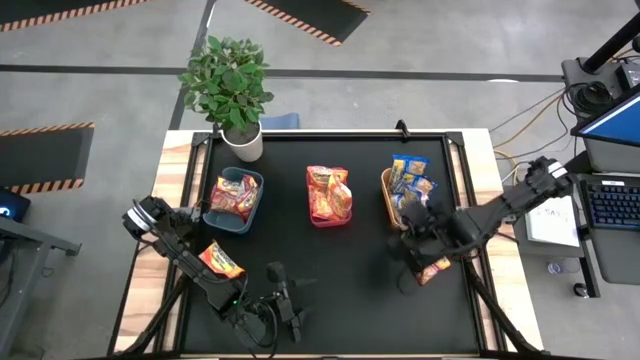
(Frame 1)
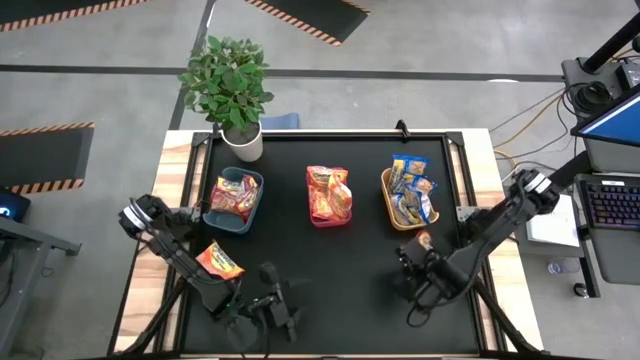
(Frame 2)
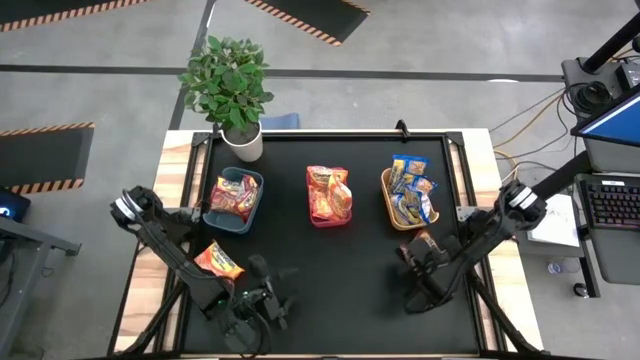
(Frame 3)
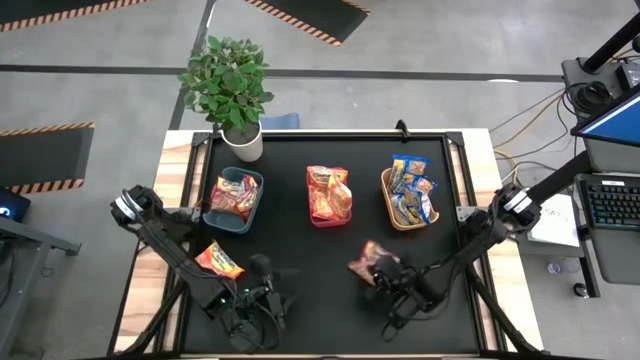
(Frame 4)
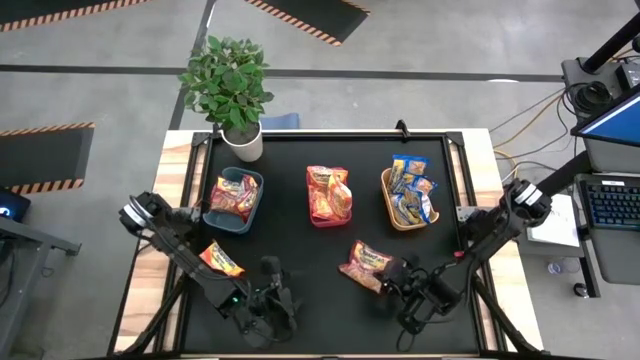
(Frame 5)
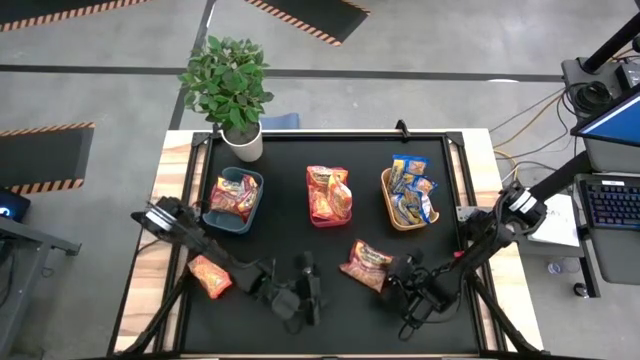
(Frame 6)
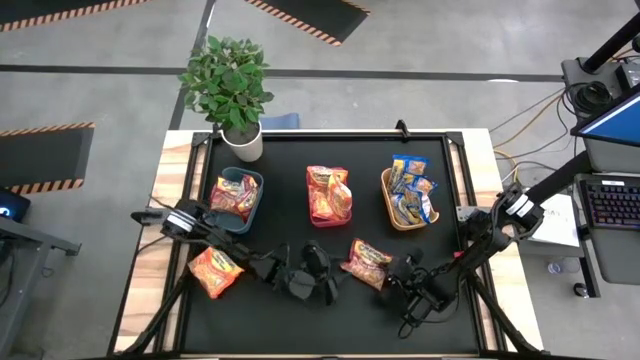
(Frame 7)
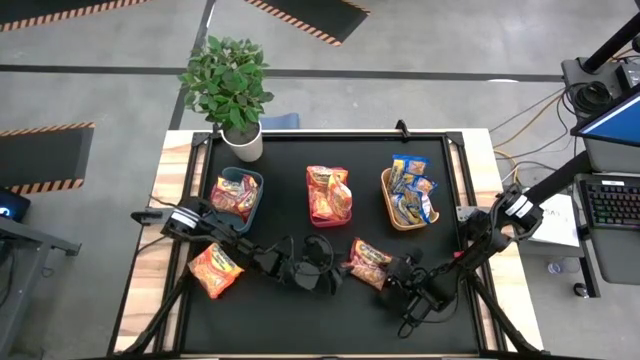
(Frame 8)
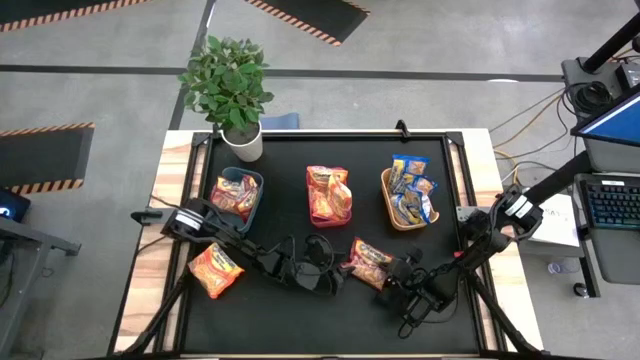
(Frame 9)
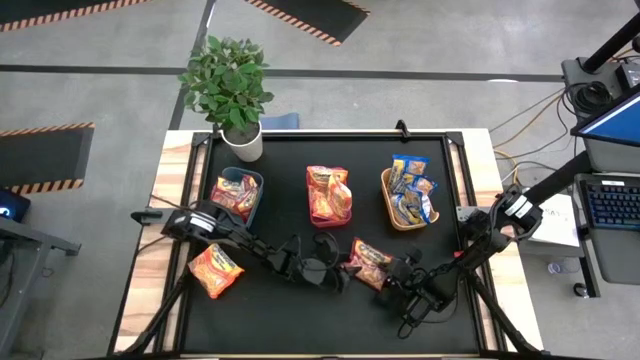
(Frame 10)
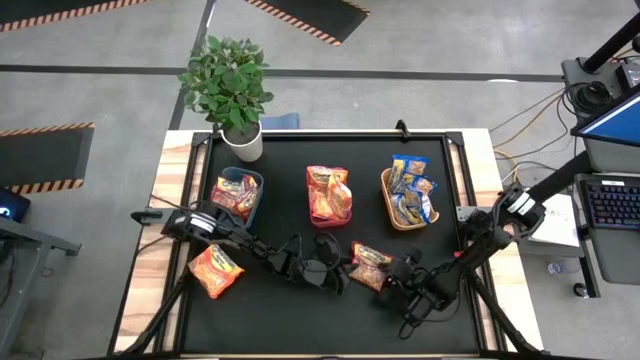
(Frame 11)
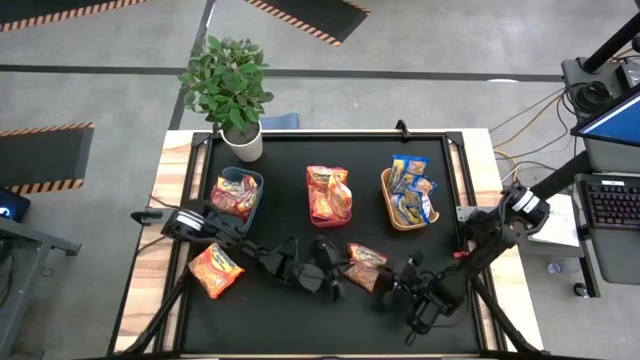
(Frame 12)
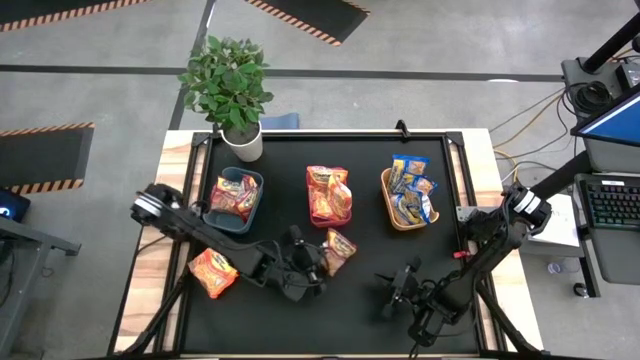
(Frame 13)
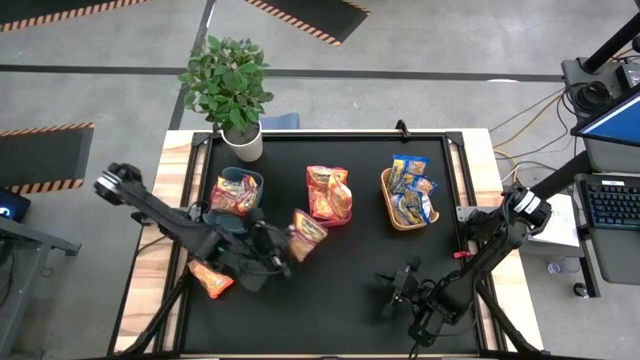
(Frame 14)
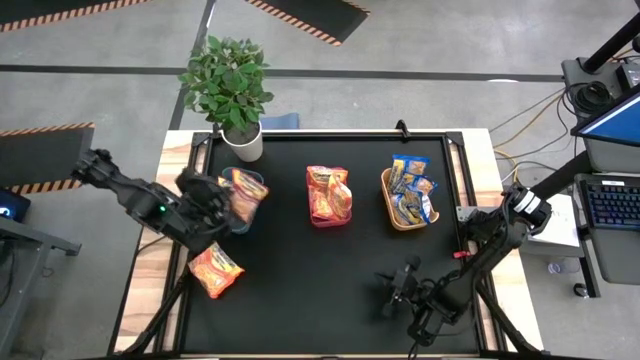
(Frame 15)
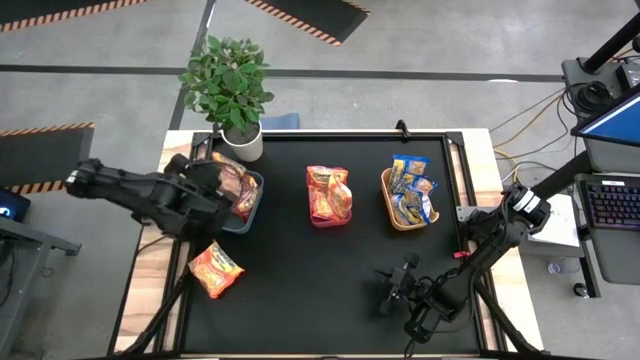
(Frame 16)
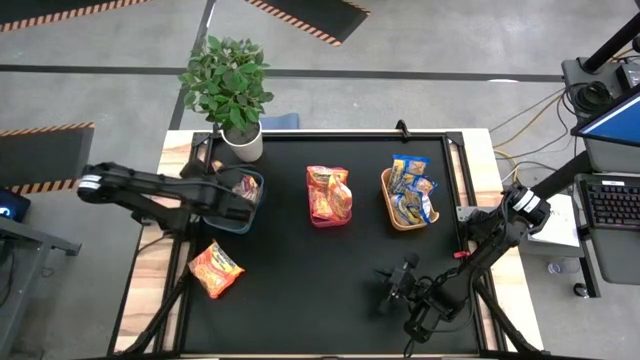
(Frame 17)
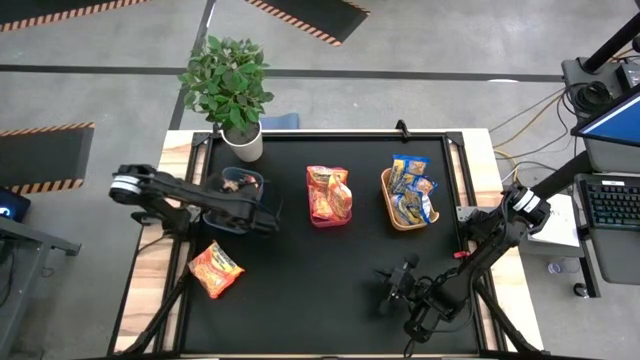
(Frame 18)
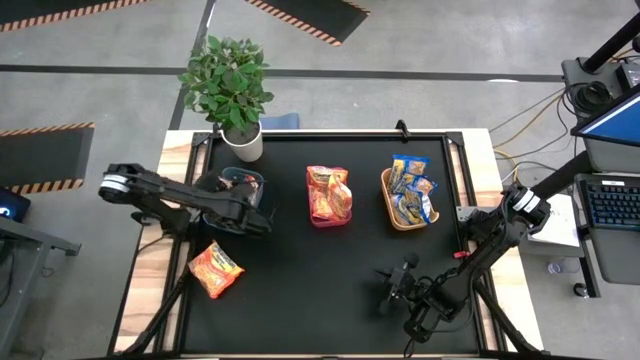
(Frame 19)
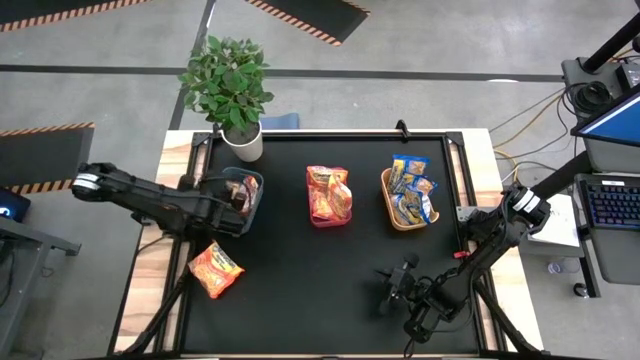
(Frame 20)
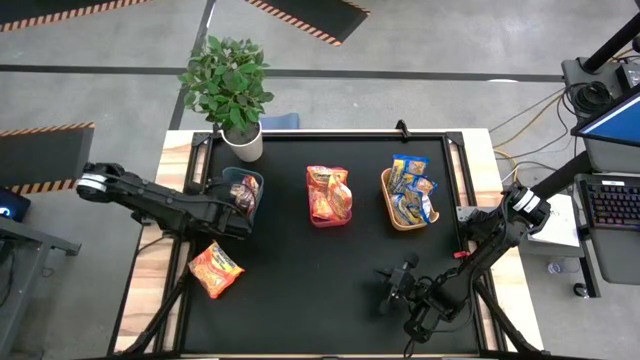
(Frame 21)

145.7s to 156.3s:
Task: Sort Maruchan noodles
Put the red noodle pack into the blue bin

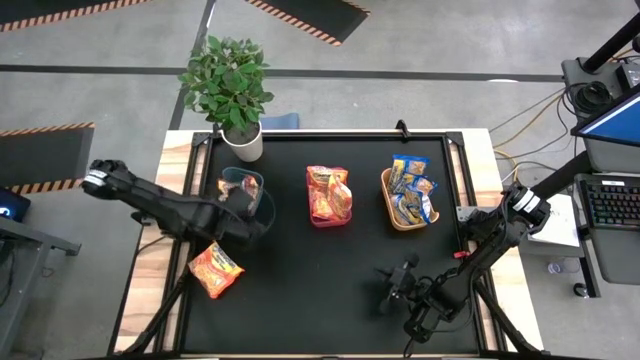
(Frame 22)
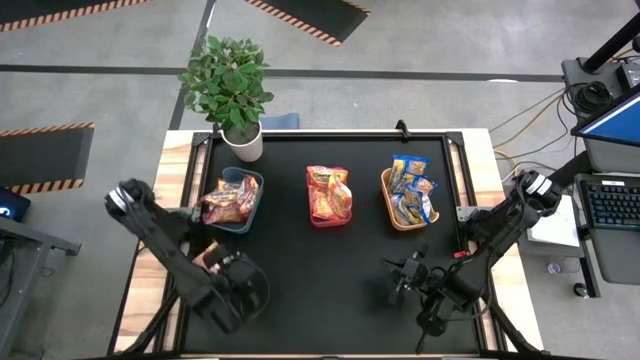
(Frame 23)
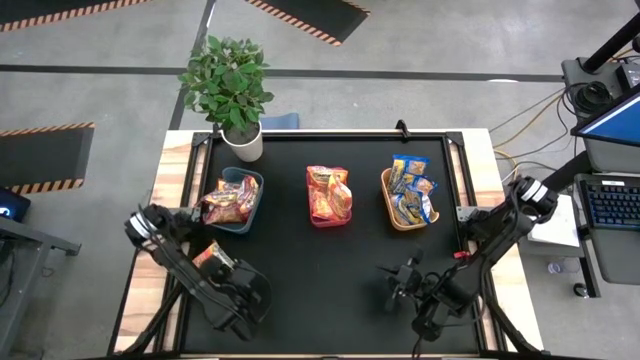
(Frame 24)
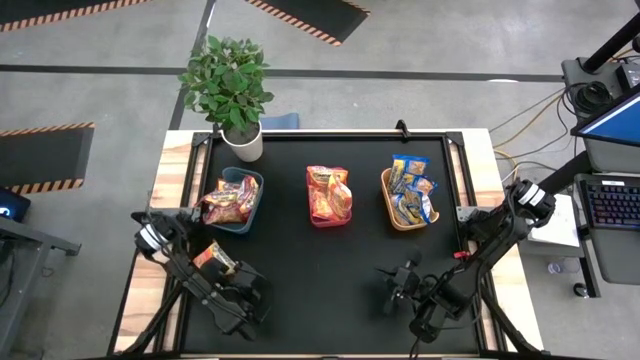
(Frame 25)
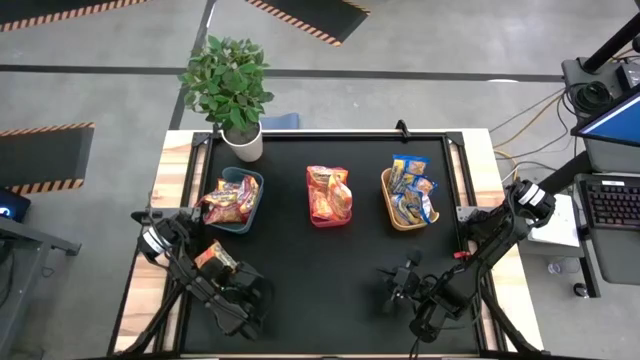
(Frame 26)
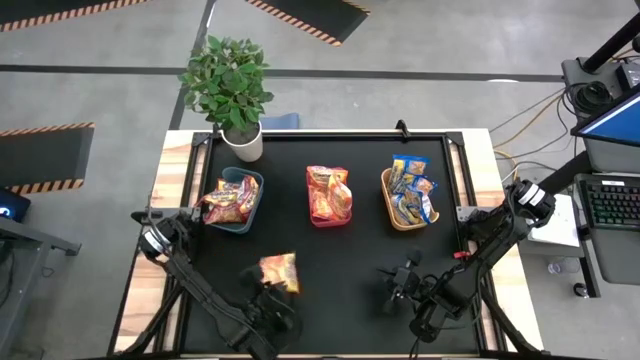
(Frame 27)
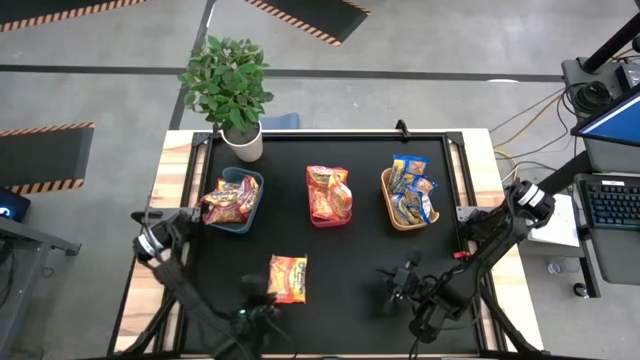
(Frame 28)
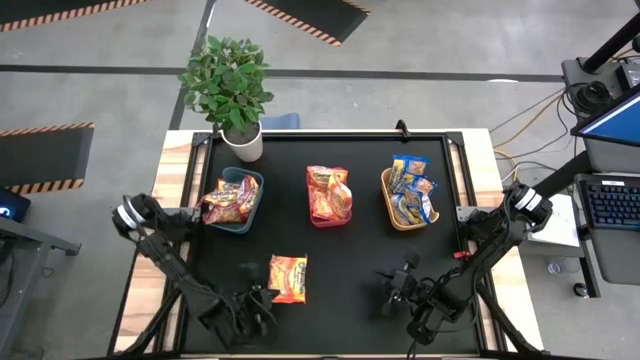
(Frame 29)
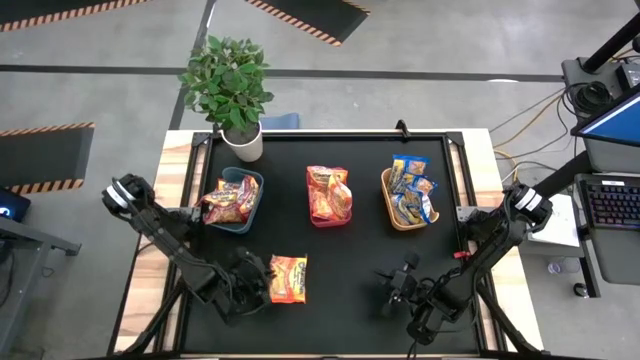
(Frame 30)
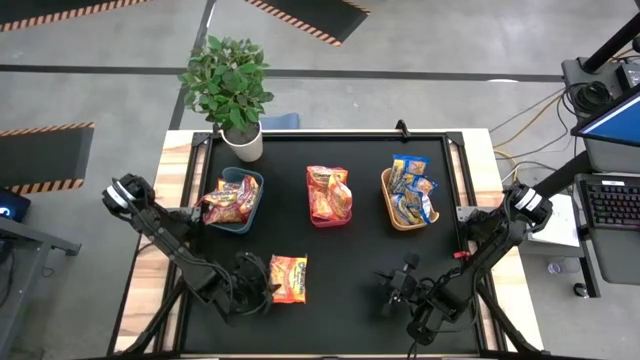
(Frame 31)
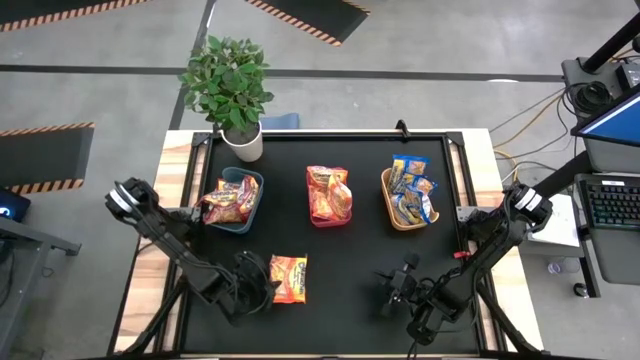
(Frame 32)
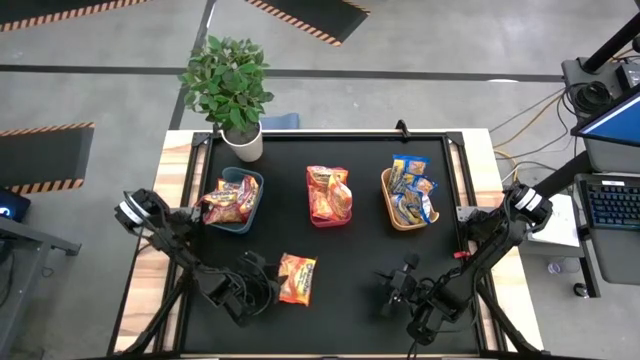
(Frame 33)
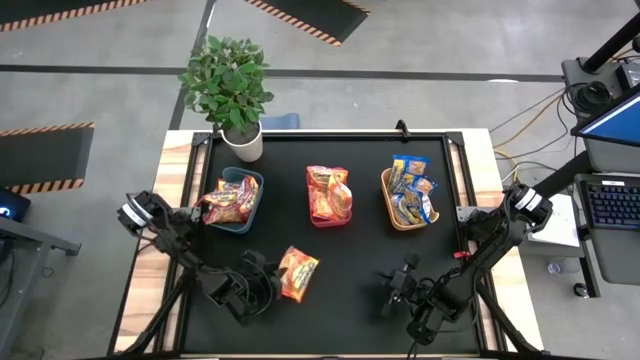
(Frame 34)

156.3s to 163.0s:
Put the orange noodle pack into the red bin

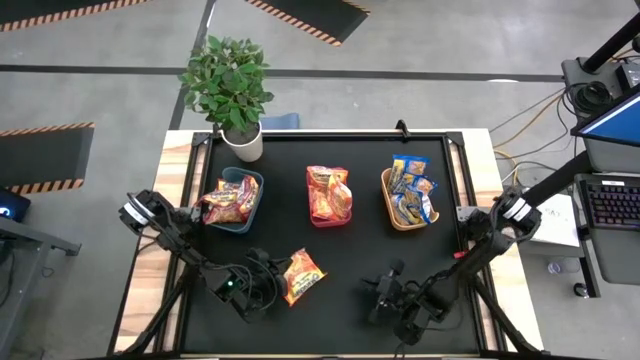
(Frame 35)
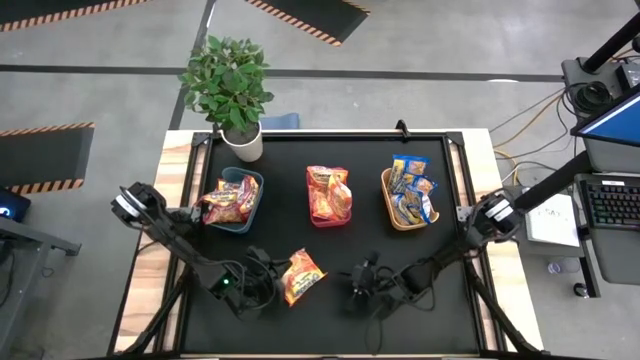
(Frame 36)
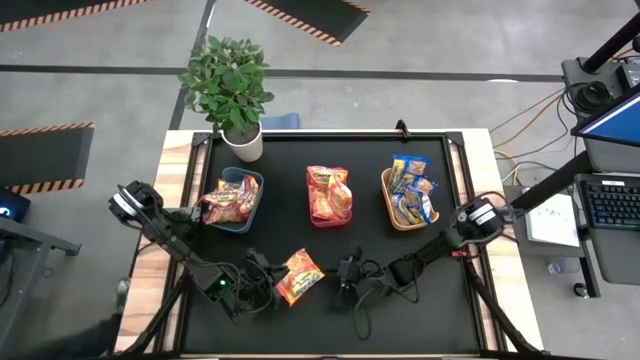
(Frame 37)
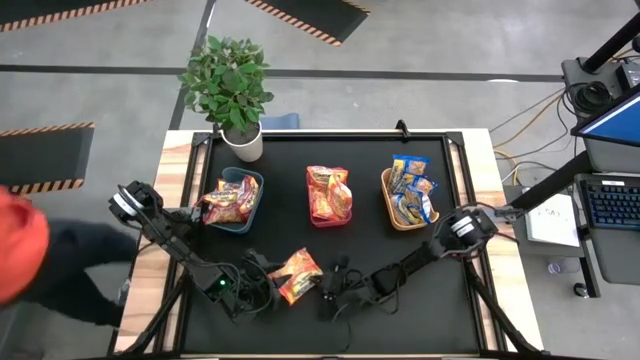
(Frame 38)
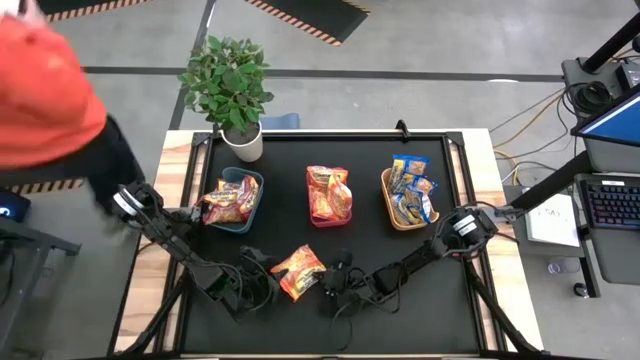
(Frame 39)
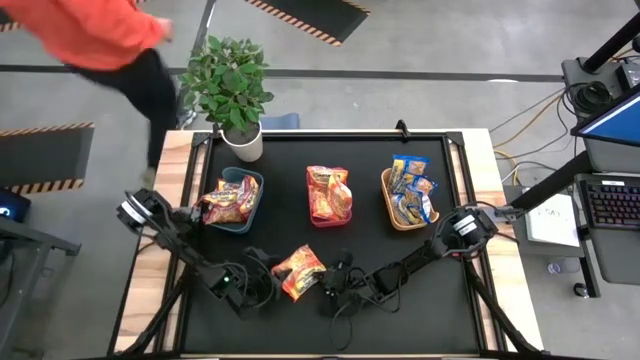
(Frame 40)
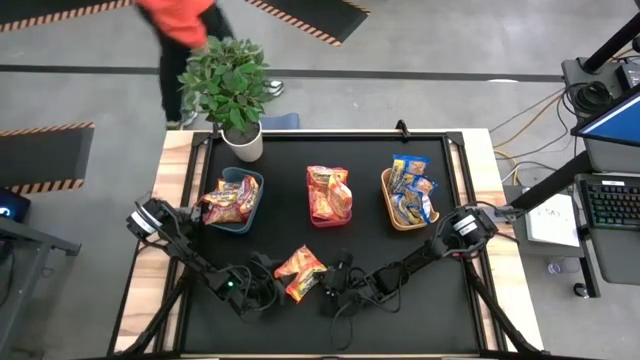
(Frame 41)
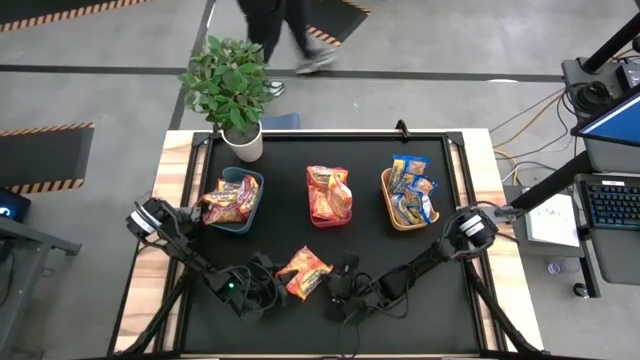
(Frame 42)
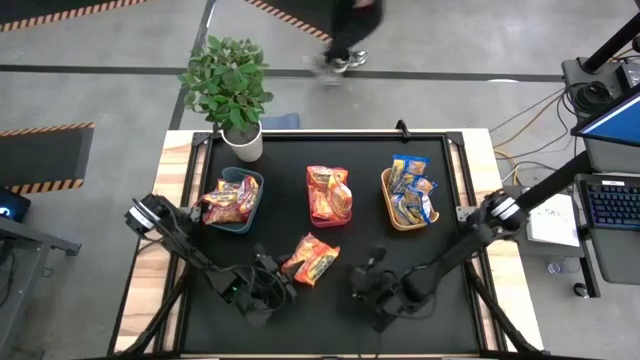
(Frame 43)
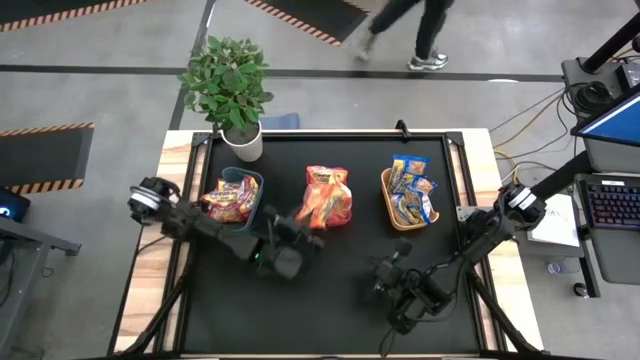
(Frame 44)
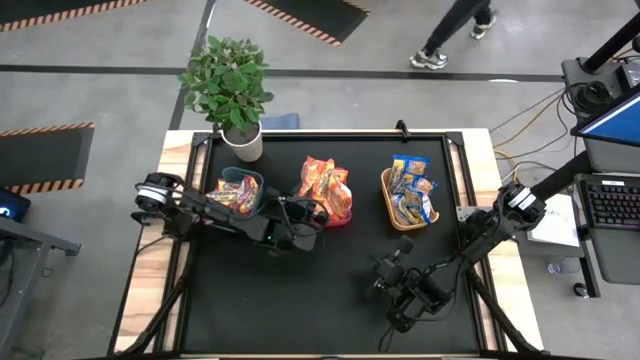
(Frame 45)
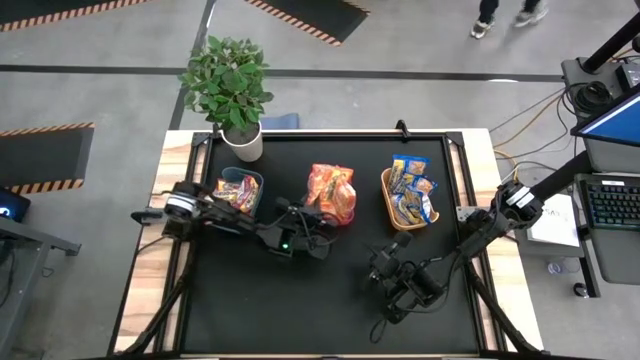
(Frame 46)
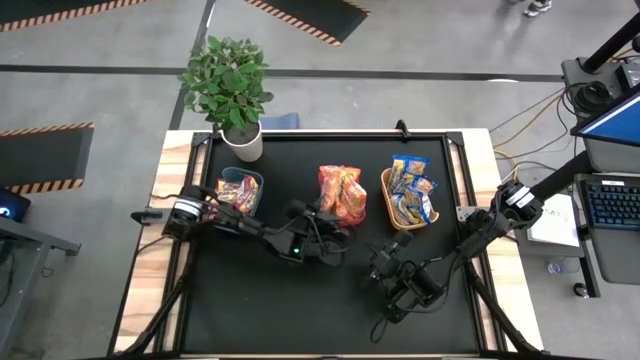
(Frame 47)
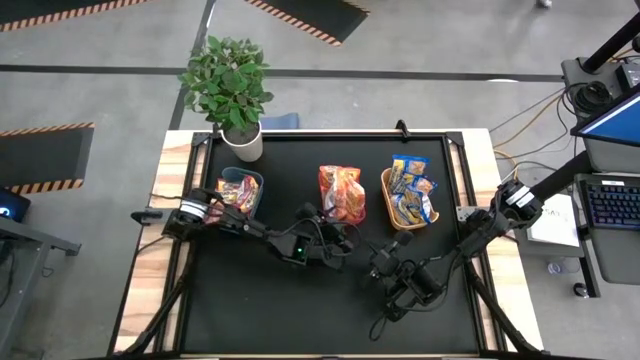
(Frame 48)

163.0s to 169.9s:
Put the orange noodle pack into the red bin
